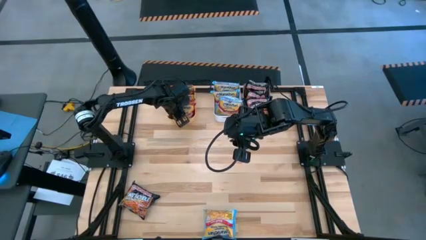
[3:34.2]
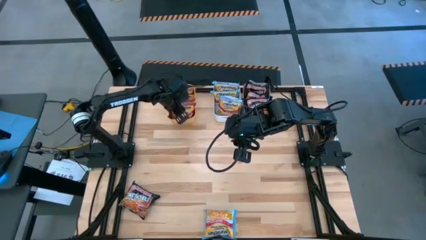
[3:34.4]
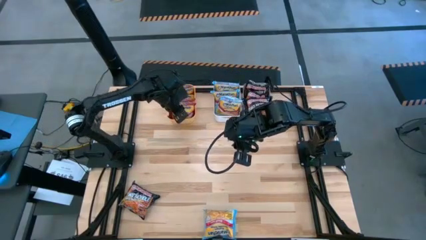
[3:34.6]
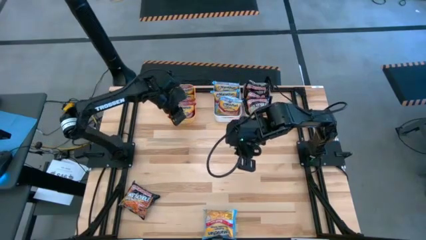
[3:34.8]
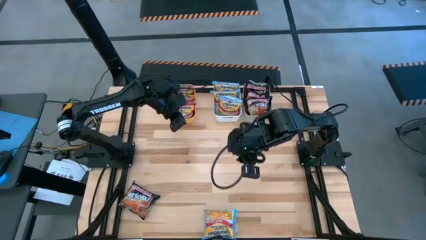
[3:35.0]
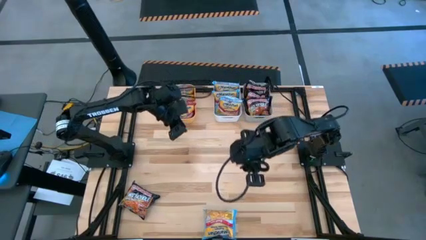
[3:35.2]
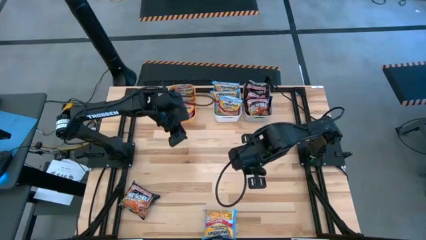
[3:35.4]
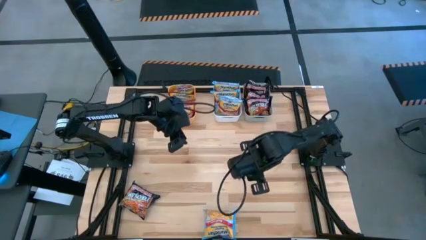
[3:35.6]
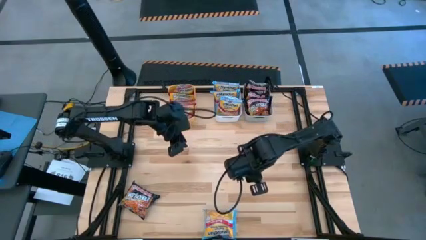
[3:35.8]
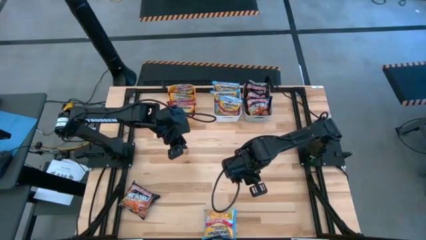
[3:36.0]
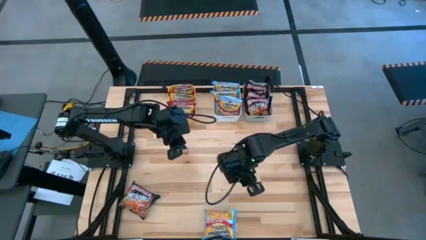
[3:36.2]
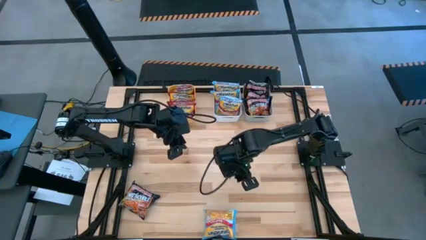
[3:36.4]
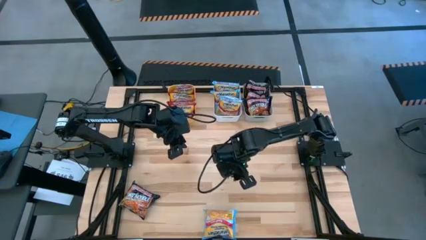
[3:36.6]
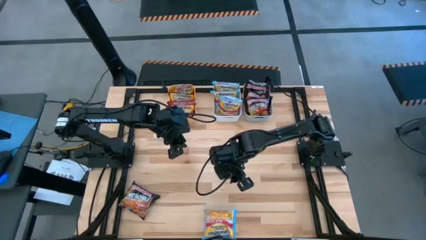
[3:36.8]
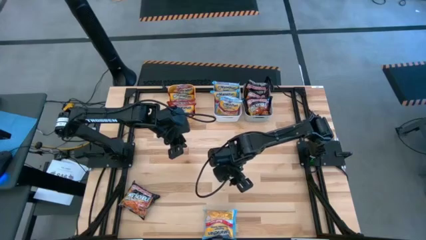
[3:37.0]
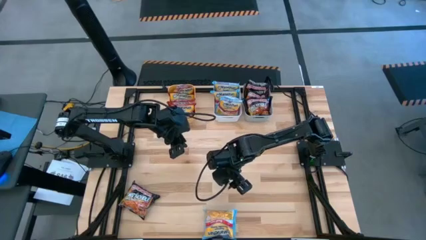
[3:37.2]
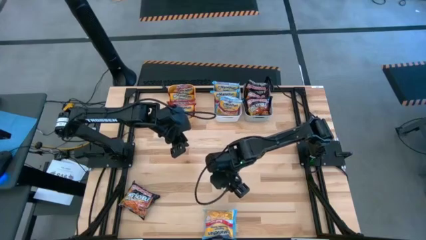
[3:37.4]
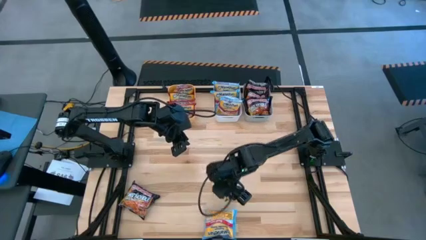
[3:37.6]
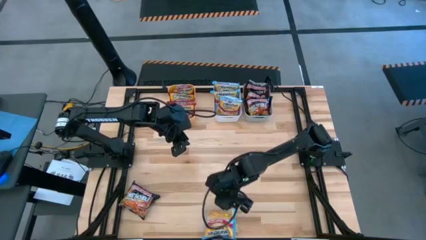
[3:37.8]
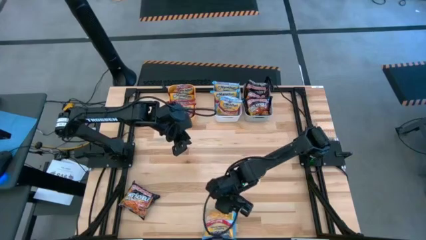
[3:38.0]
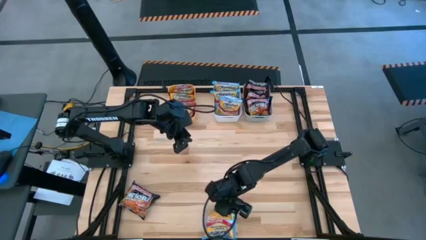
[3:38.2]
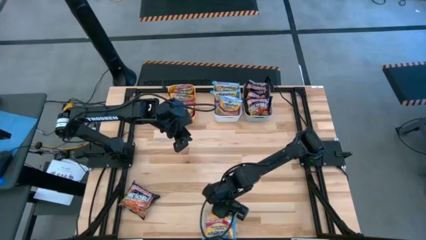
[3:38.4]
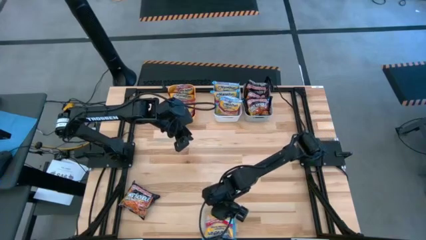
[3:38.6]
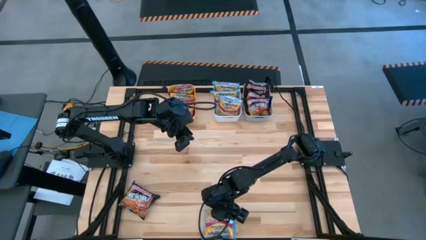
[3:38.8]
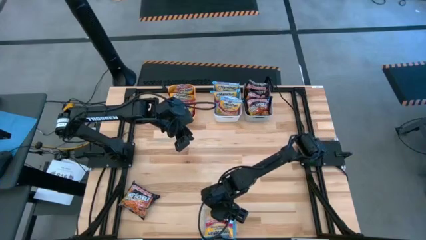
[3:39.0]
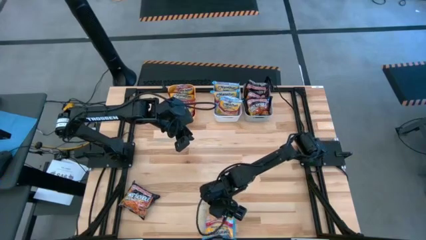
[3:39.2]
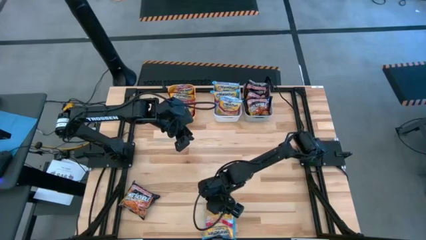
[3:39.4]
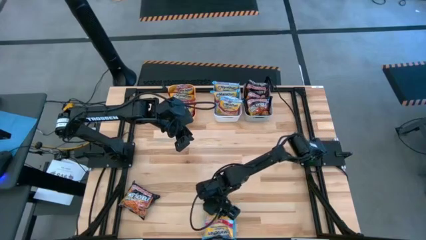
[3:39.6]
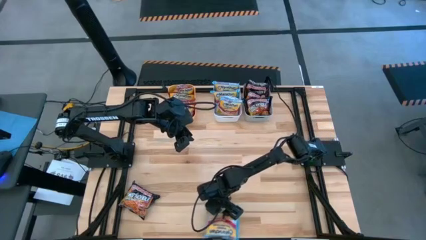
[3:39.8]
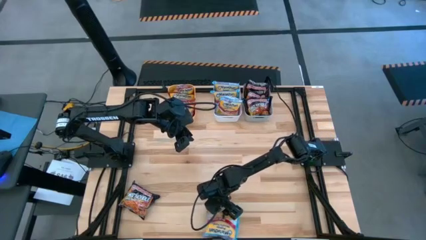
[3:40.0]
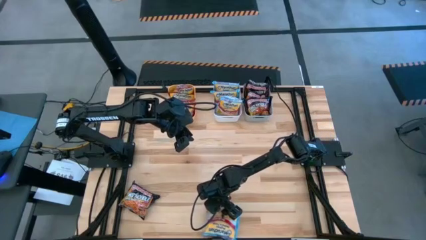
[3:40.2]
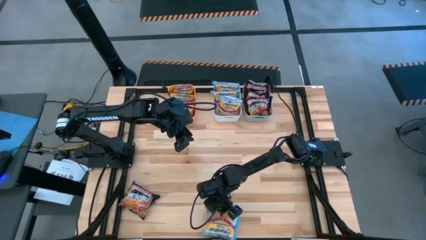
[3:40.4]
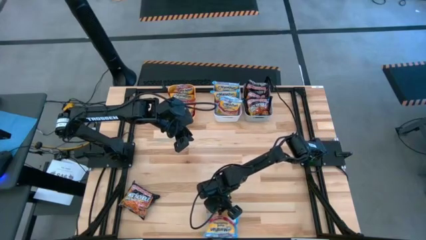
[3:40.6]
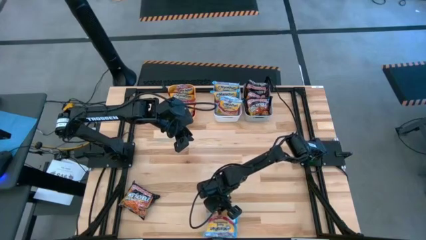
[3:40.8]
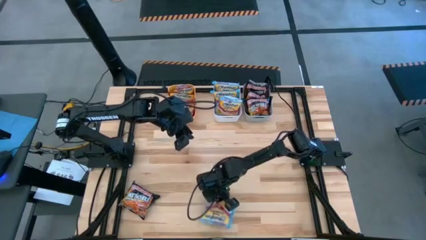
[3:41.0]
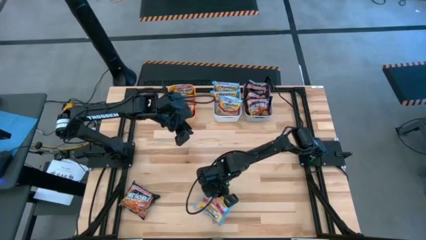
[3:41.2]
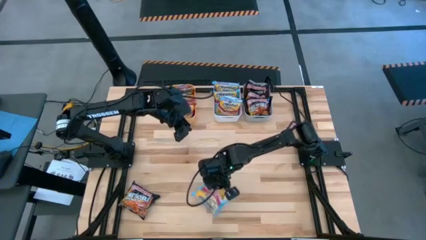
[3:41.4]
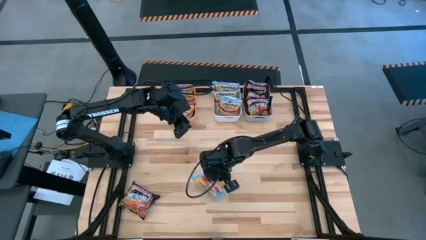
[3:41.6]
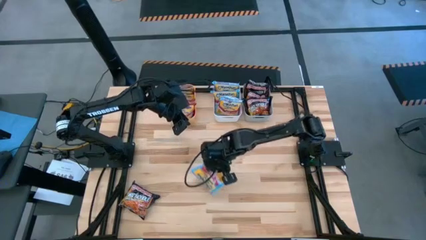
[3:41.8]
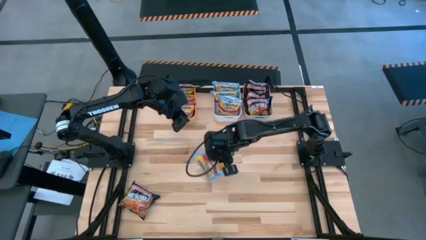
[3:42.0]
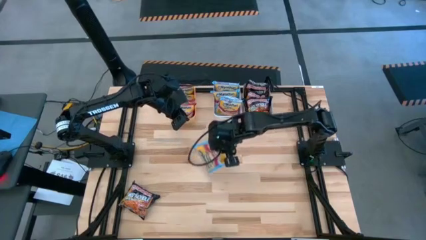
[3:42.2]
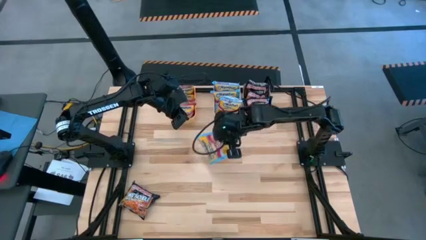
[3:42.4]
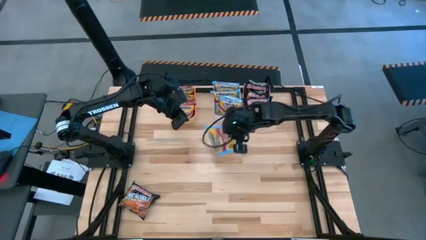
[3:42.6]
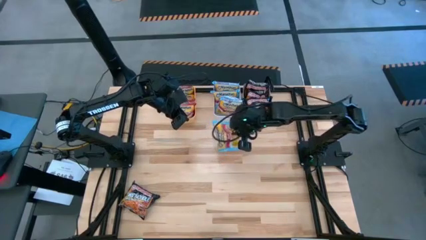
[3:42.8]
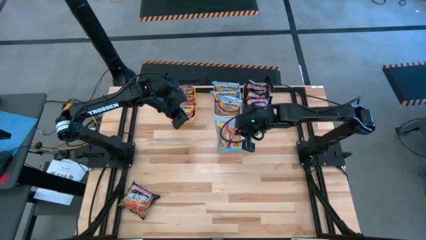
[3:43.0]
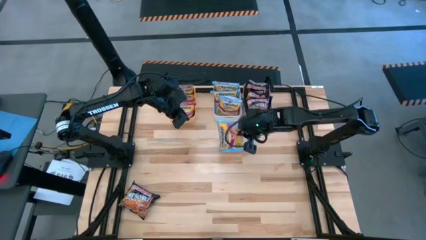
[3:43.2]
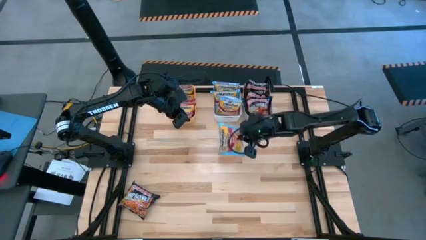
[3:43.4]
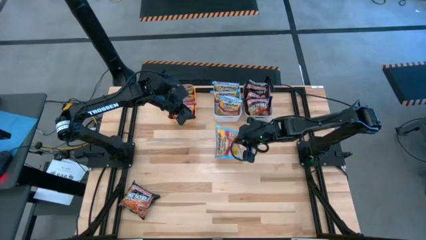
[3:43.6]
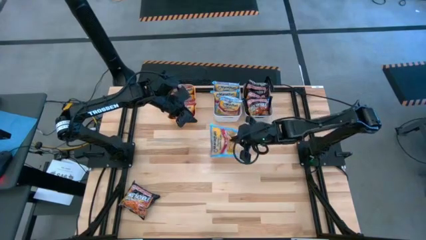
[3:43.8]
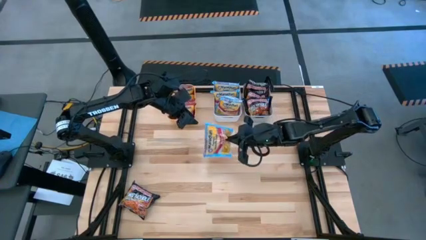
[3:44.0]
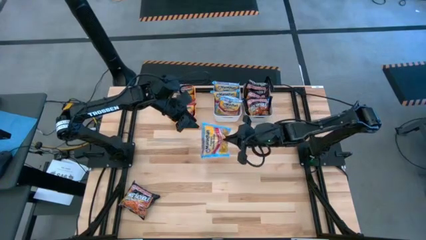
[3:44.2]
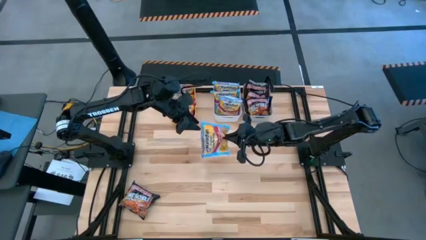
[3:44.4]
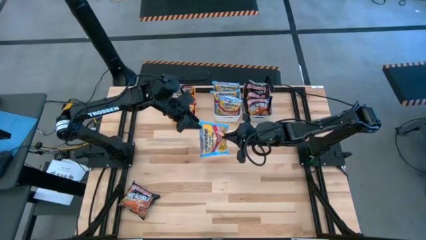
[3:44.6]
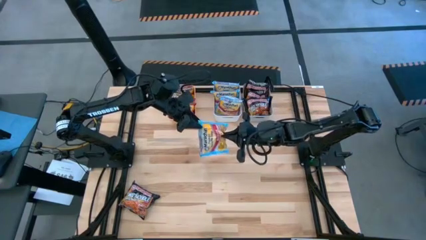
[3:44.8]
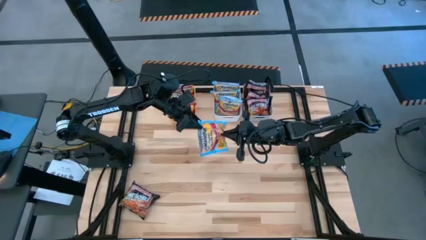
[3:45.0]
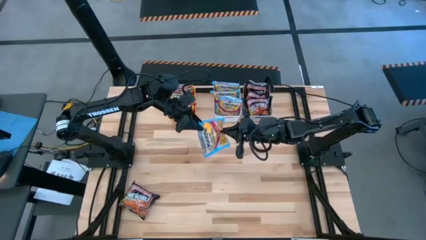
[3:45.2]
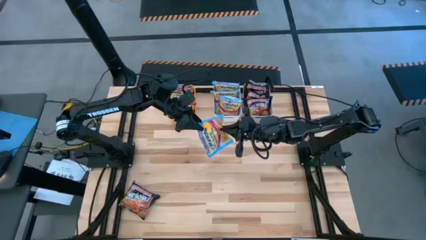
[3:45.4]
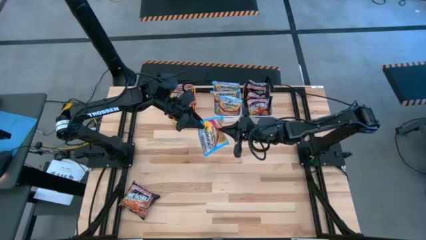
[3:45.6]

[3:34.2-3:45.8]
Task: Sort Maruchan noodles
Put the blue noodle pack into the white bin

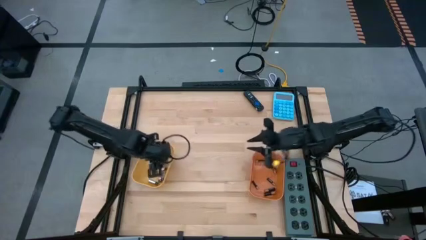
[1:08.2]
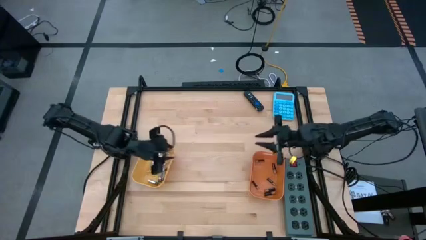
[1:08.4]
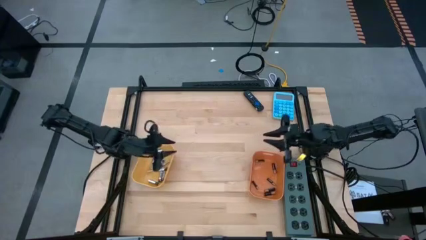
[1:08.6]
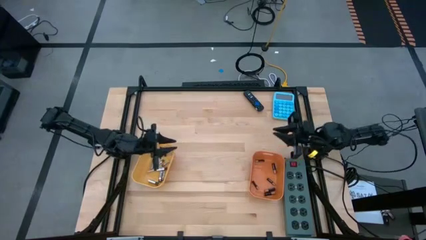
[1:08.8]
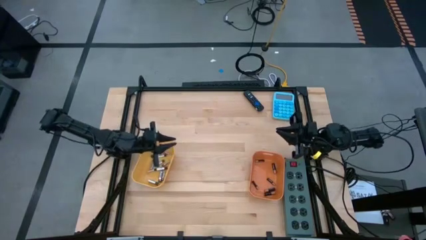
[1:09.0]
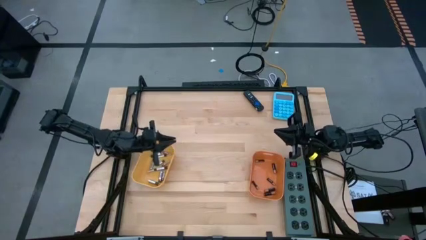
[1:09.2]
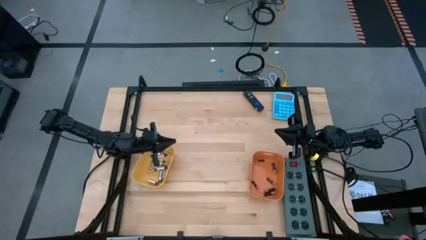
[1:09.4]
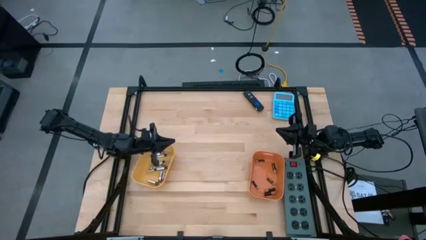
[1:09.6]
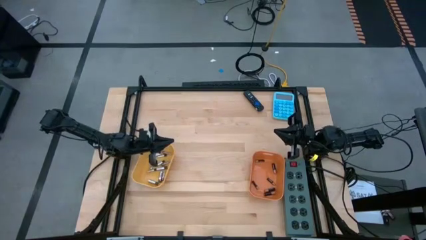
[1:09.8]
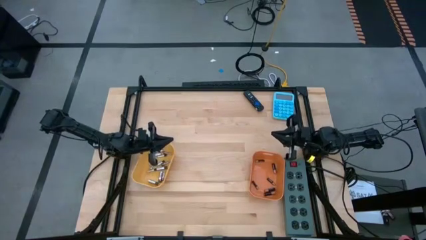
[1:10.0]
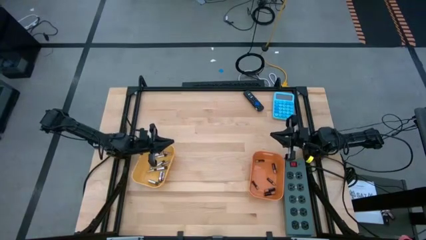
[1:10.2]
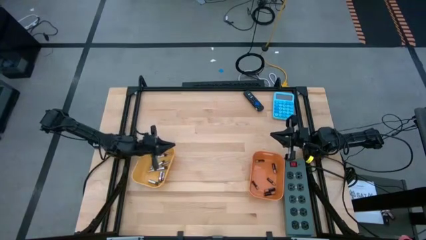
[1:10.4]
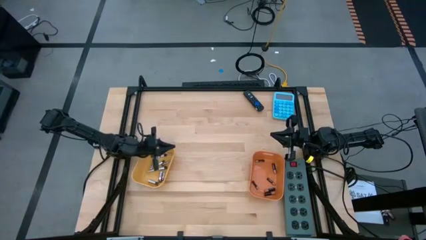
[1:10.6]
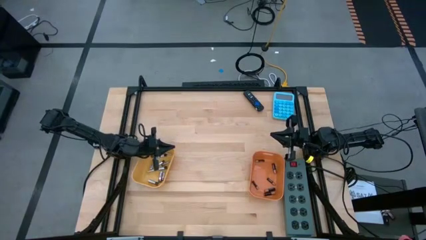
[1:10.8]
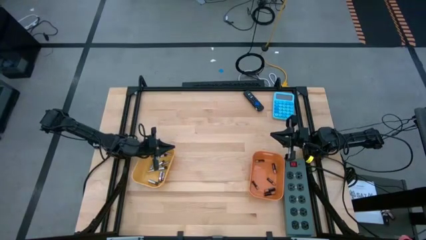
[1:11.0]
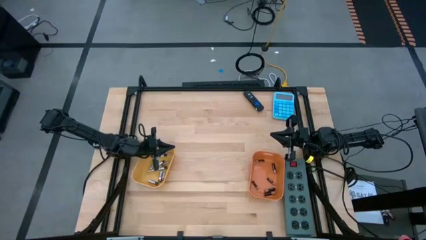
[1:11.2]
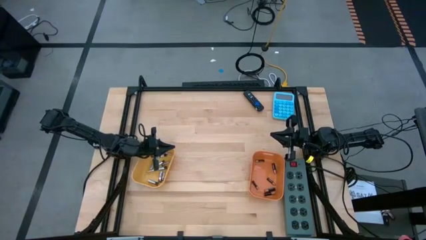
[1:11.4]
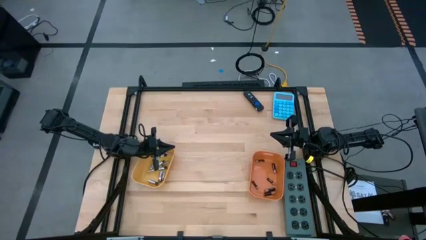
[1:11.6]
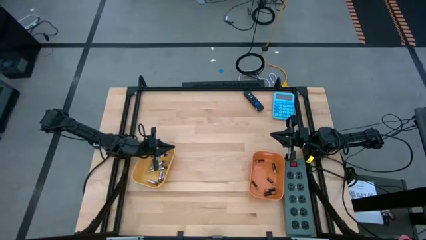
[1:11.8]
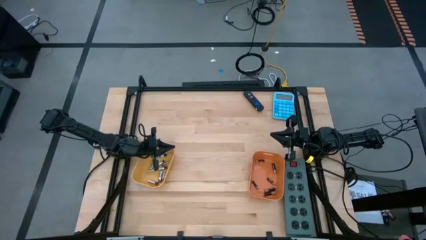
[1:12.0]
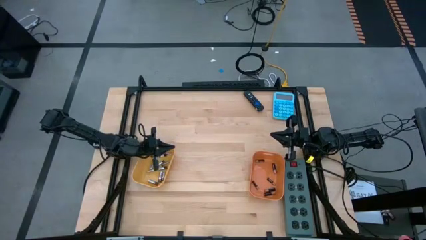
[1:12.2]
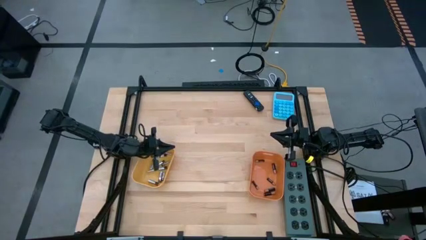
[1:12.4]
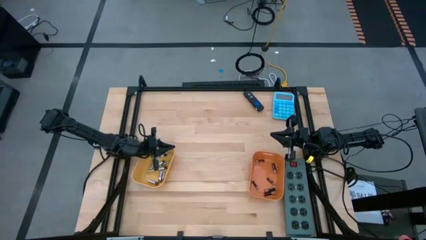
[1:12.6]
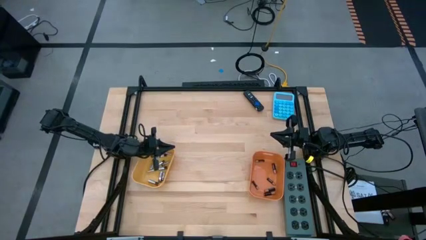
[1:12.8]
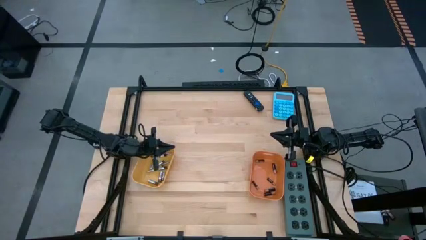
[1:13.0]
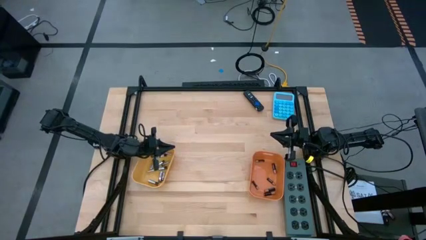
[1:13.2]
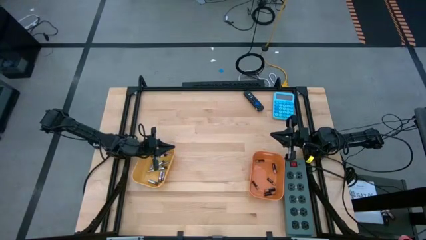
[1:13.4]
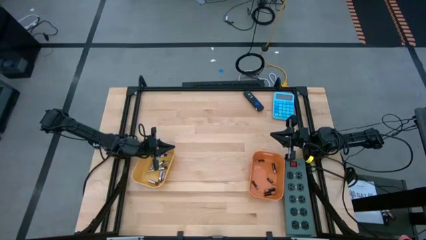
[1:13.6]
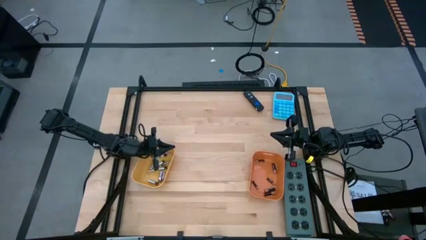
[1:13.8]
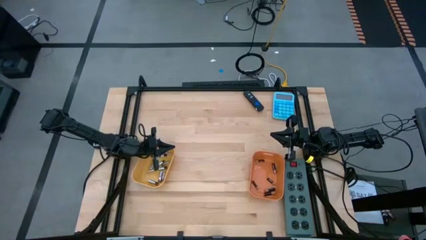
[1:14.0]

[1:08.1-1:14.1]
Task: Sort batteries
Return to Home Position
